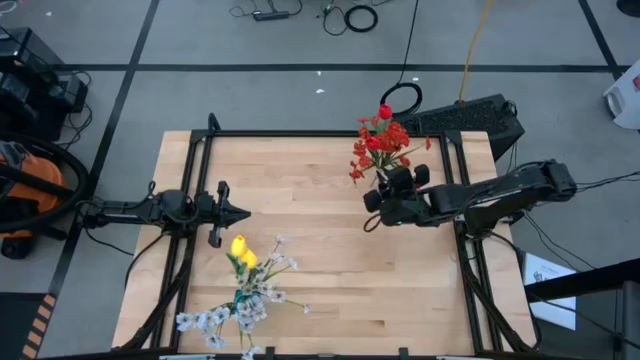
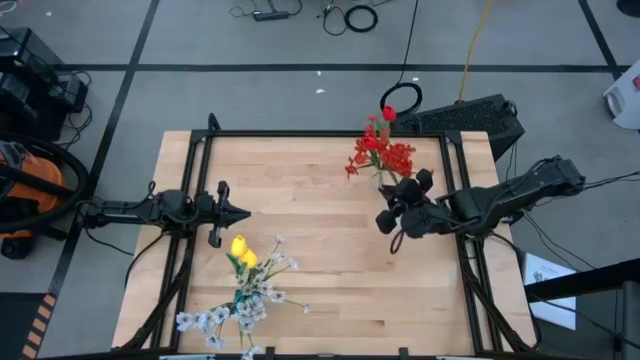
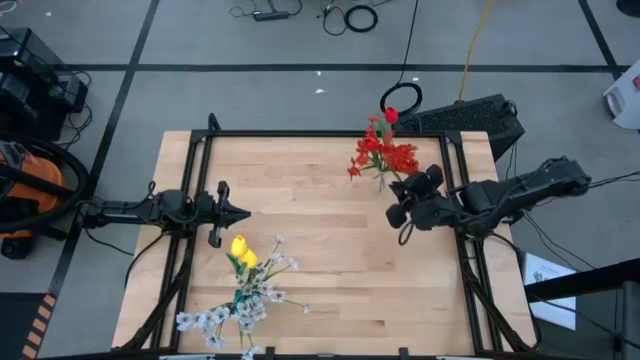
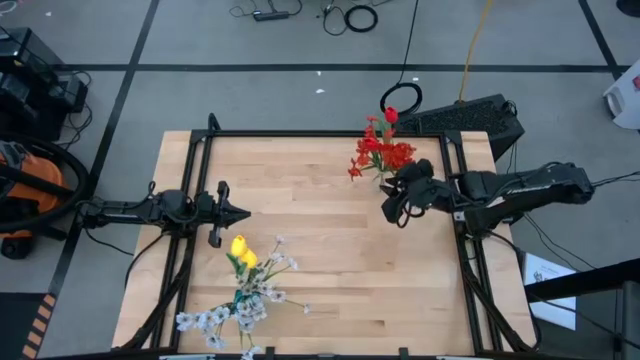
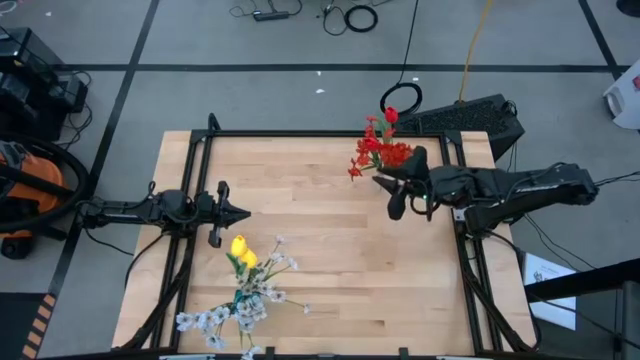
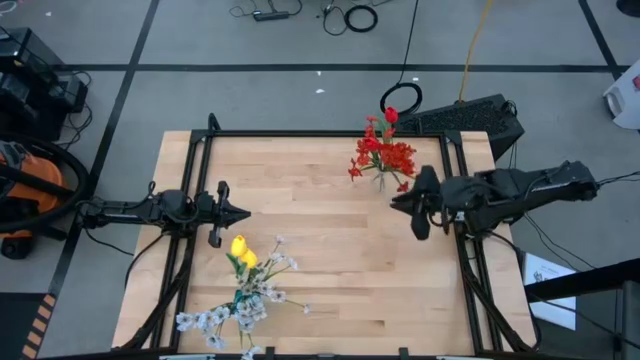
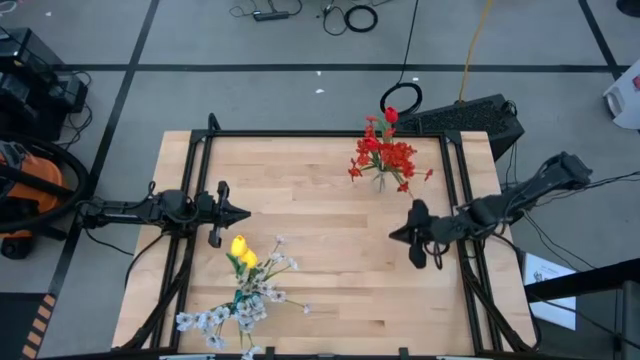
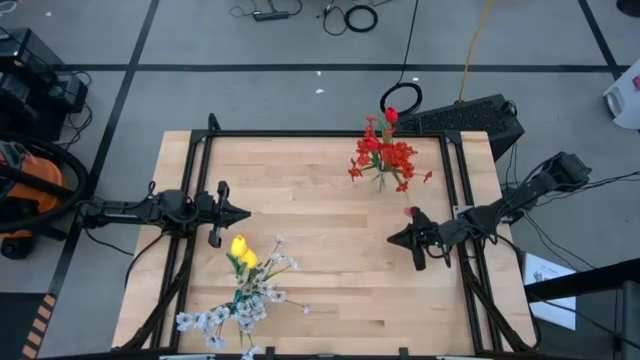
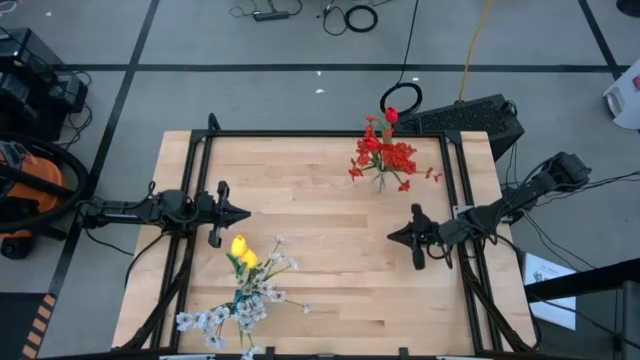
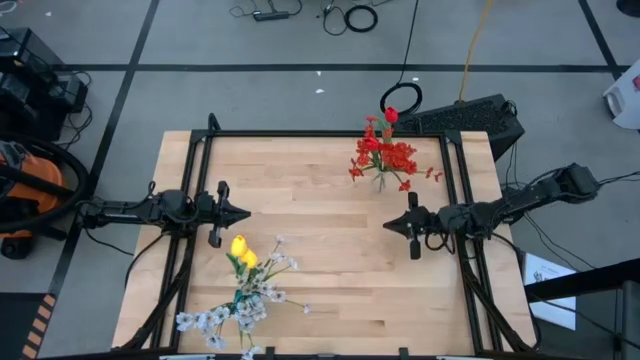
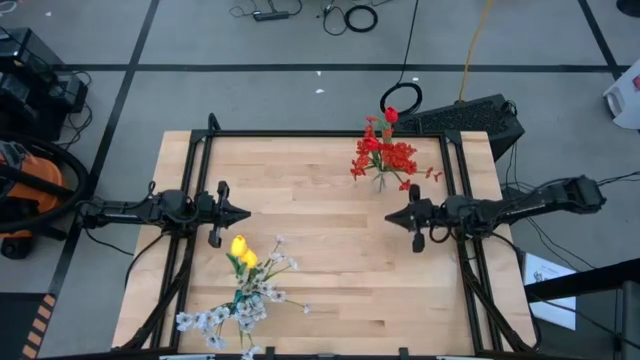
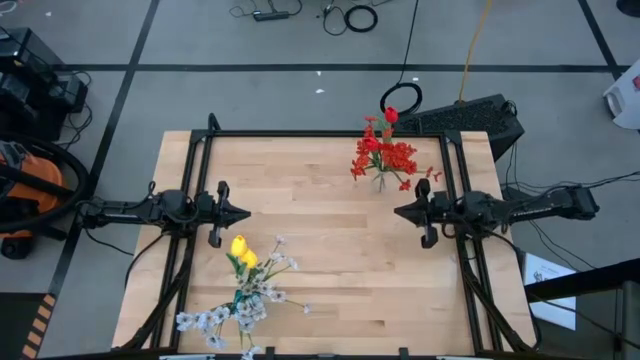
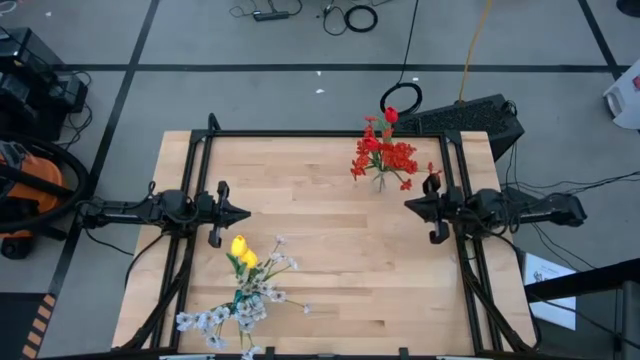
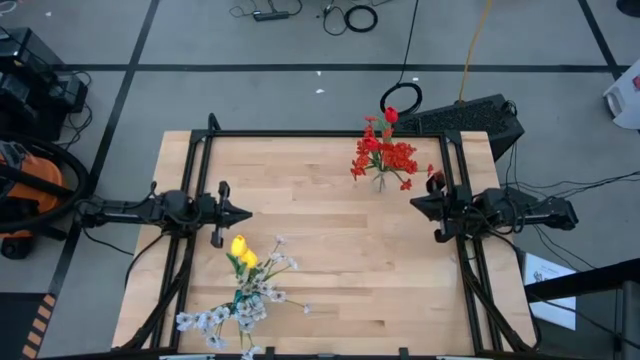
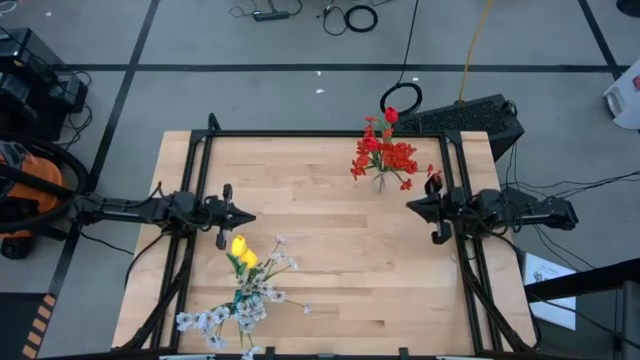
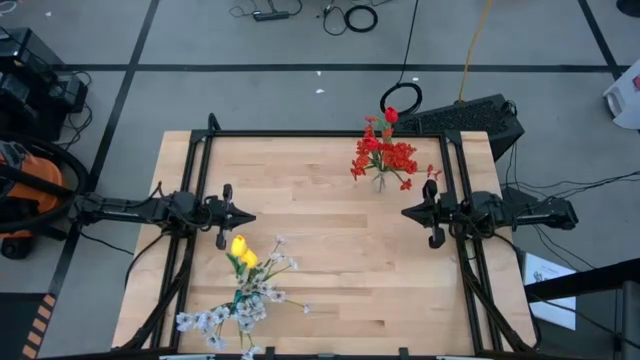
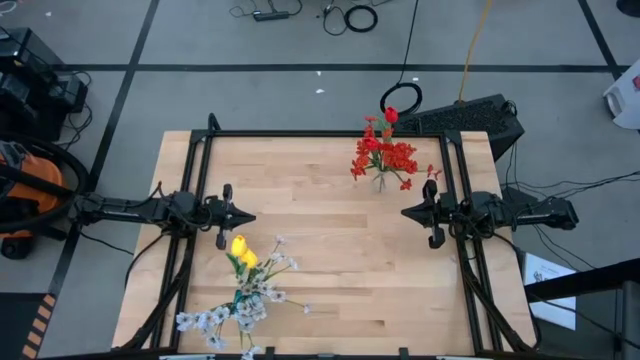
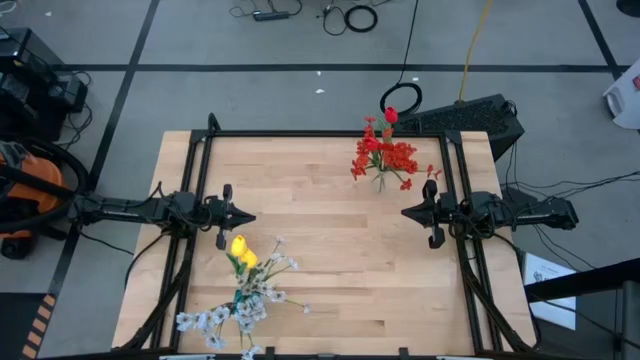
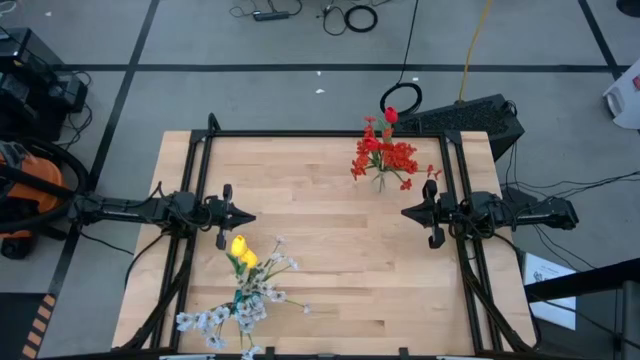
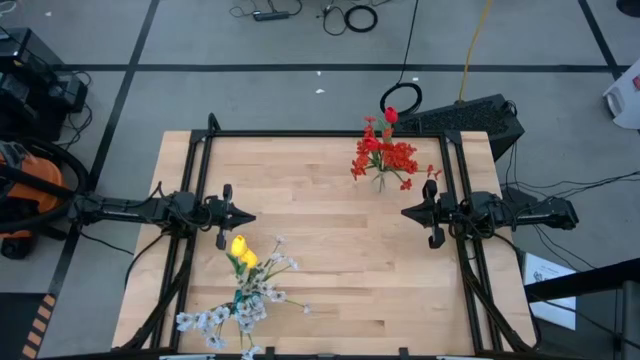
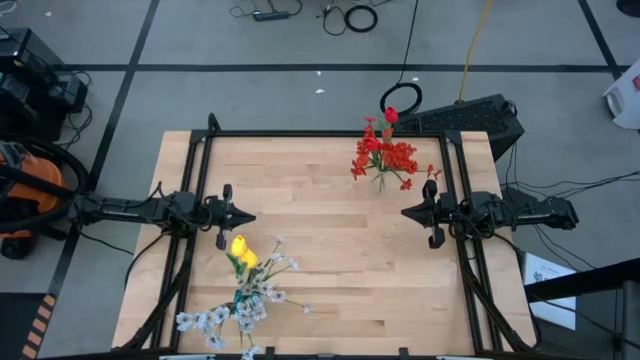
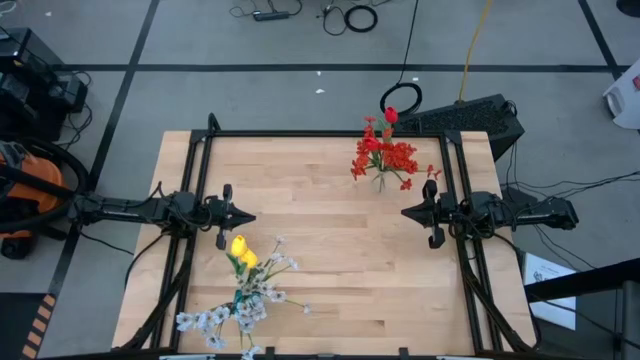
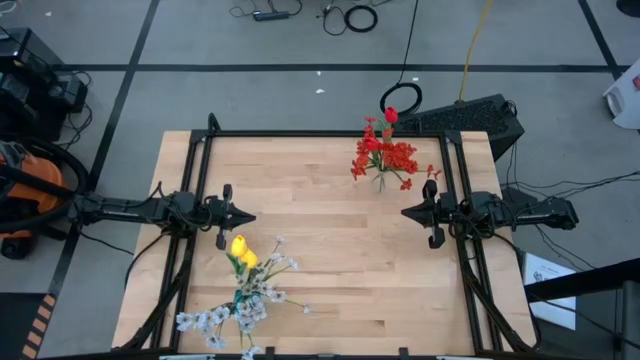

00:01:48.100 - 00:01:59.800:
Task: Sort flowers into vase by color
Return to Home Position

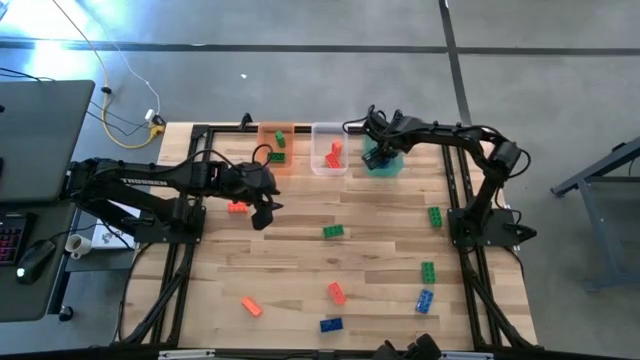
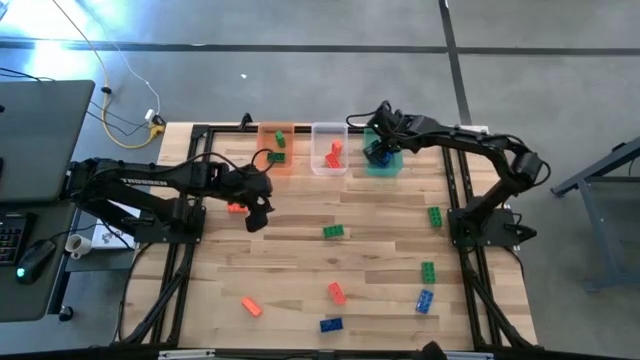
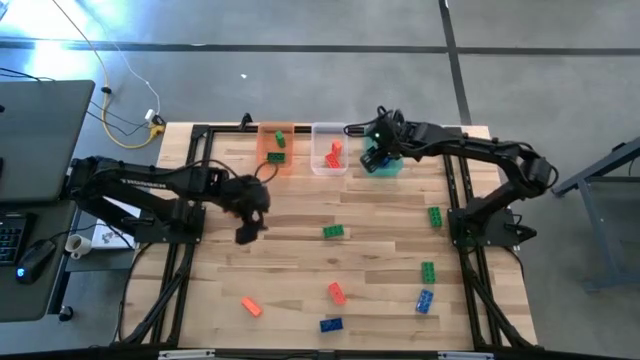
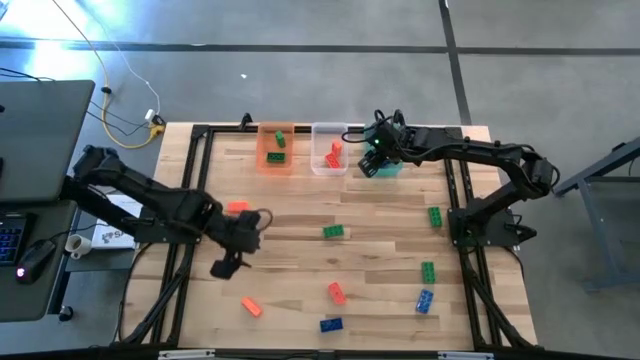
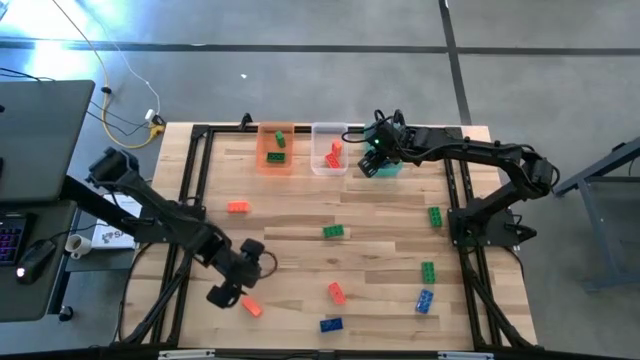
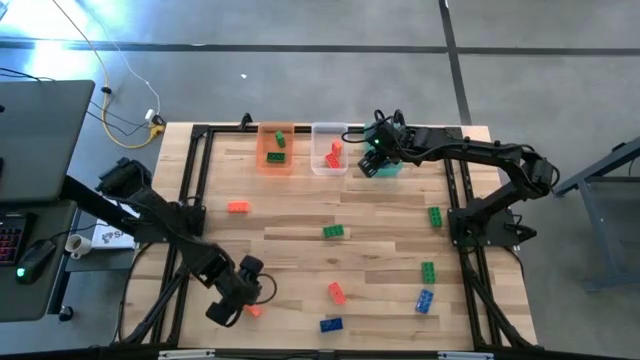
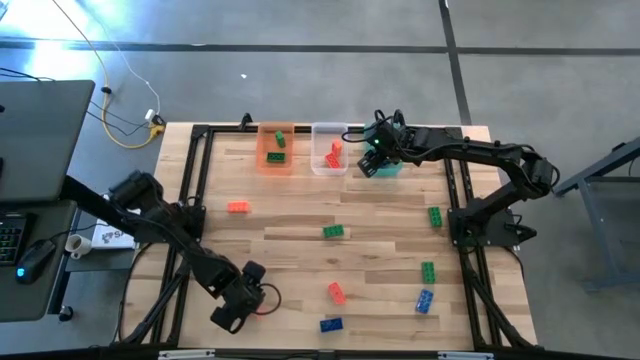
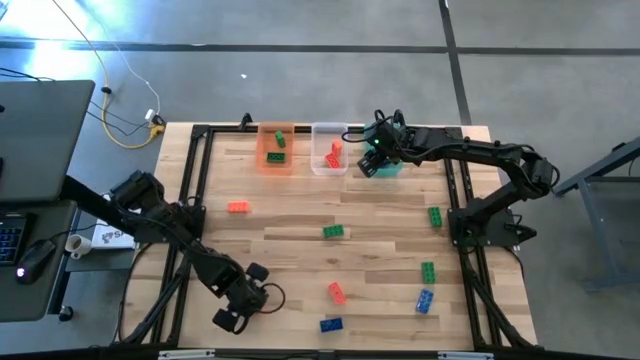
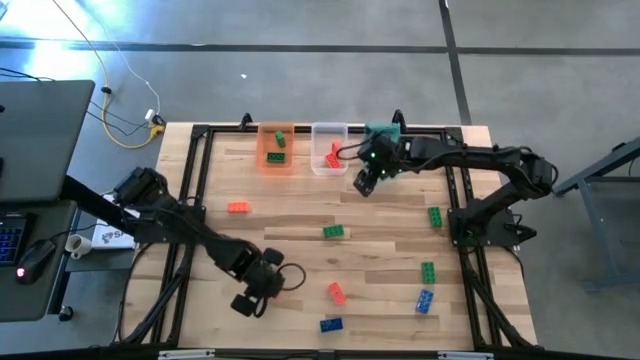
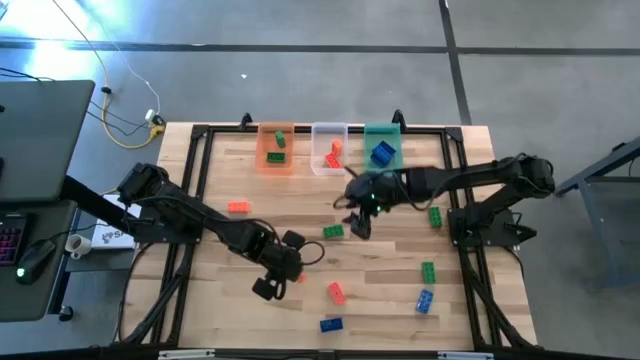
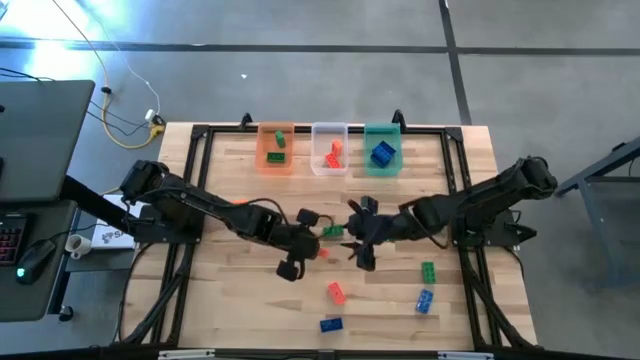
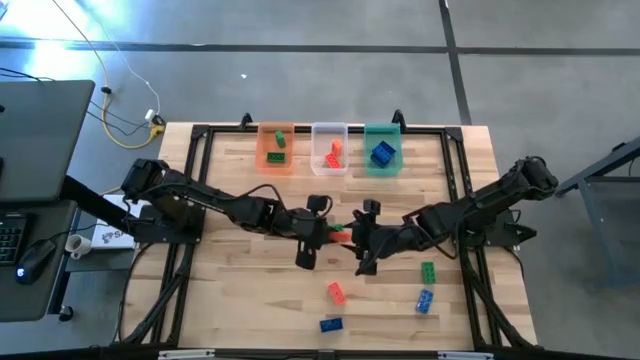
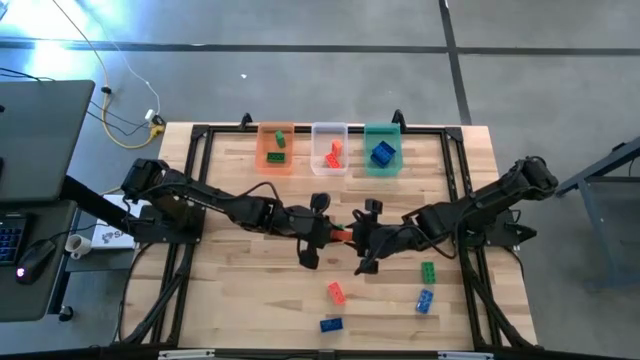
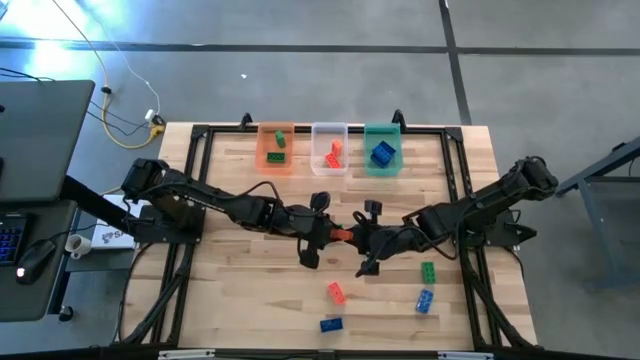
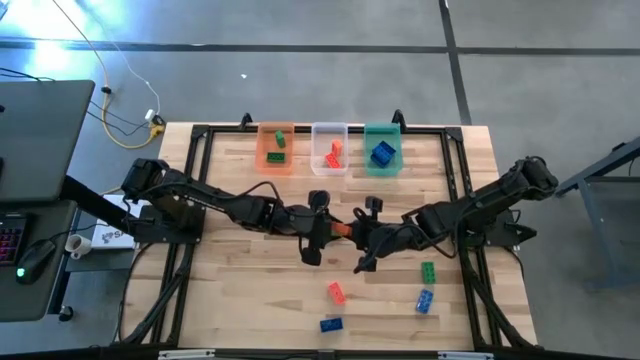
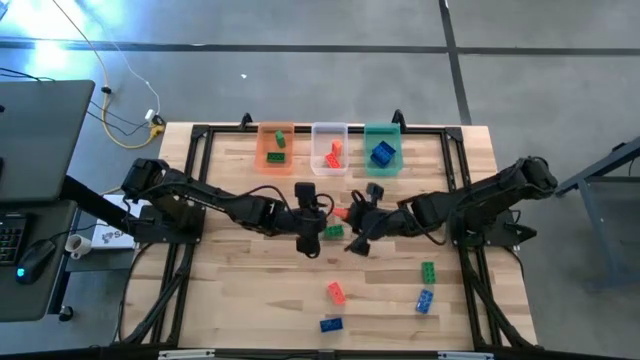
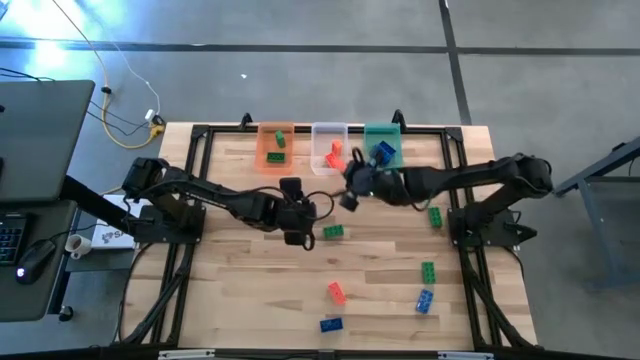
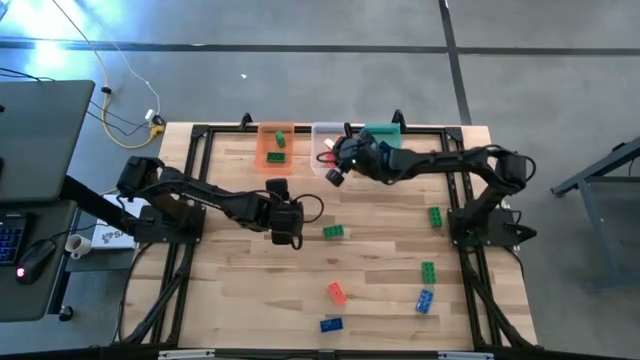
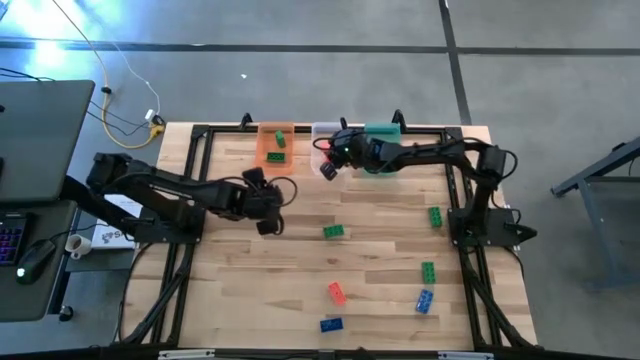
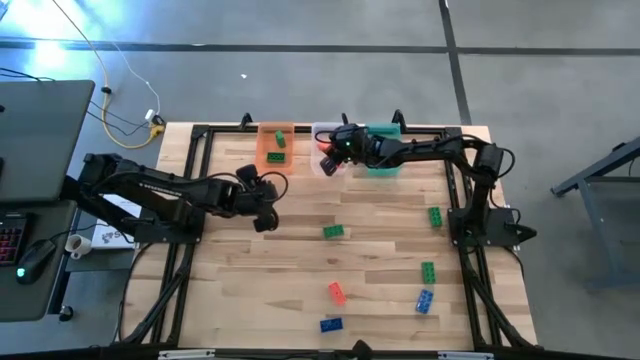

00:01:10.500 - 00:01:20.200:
Task: Sort & place blocks by color
Put the orange game piece into the transparent bin
